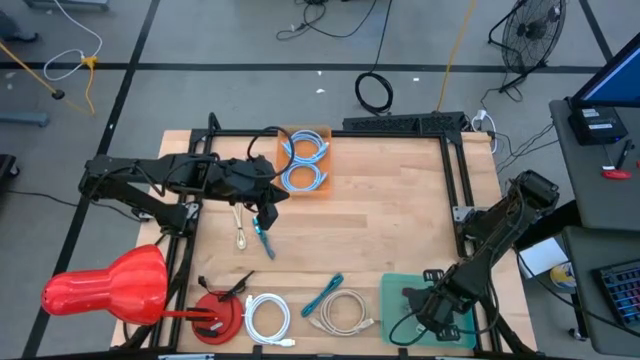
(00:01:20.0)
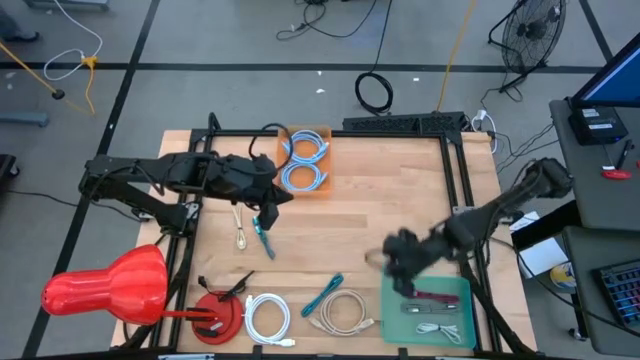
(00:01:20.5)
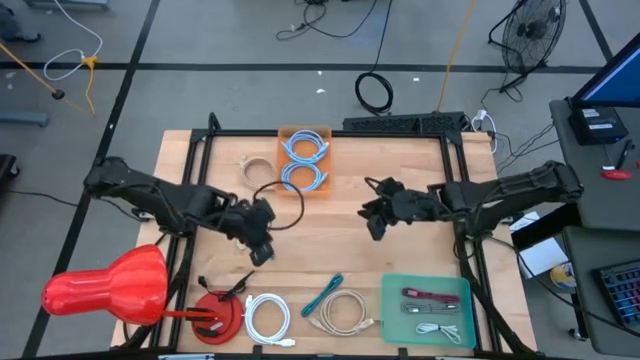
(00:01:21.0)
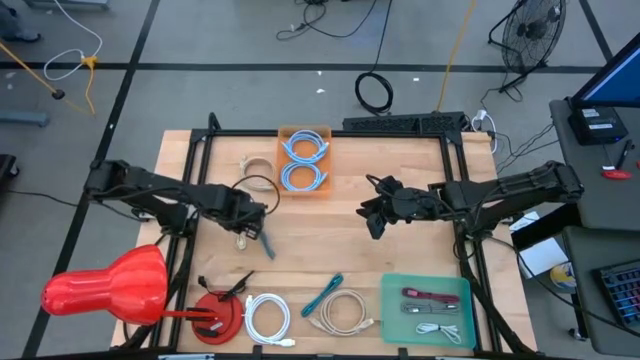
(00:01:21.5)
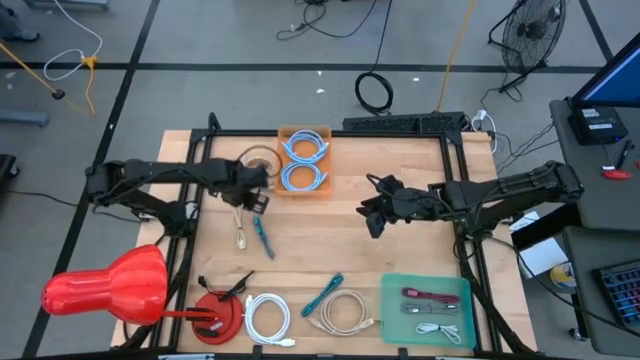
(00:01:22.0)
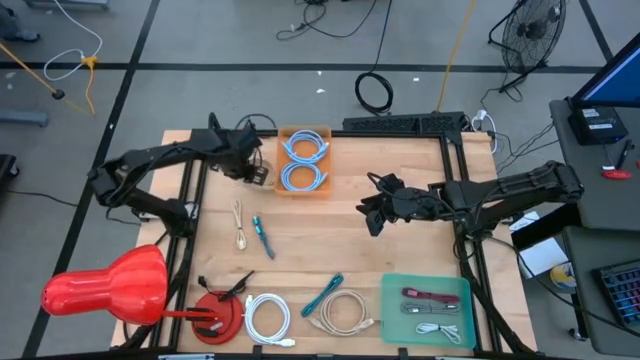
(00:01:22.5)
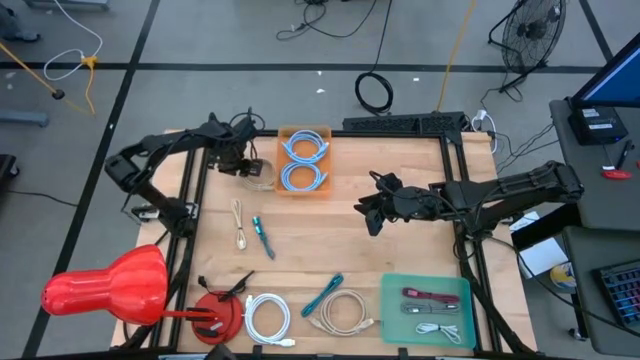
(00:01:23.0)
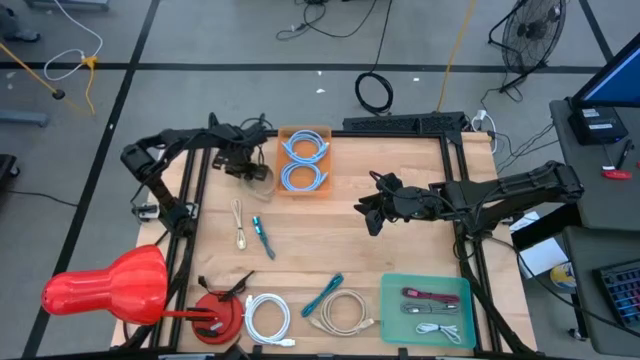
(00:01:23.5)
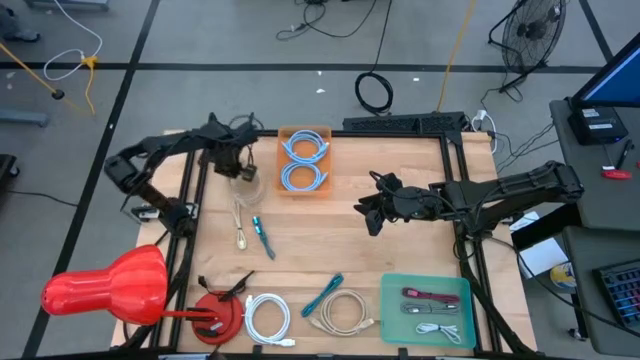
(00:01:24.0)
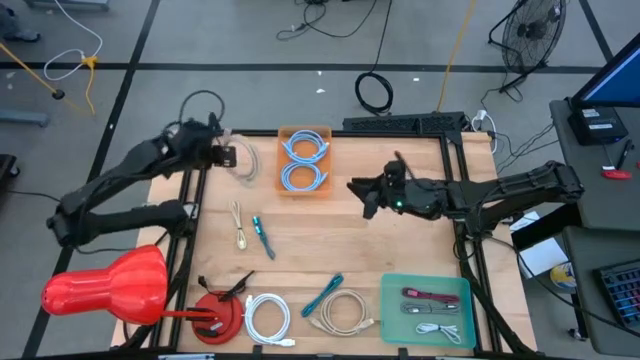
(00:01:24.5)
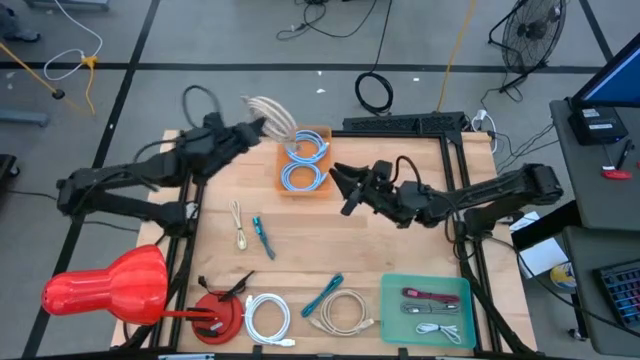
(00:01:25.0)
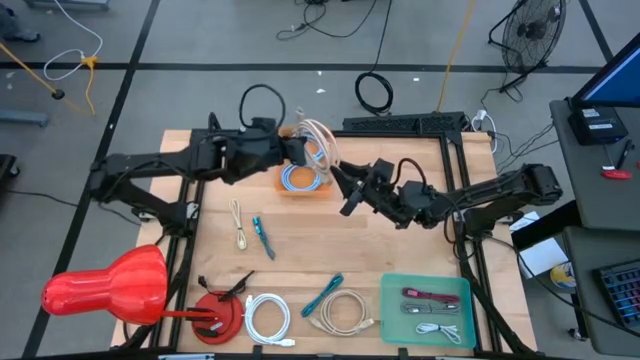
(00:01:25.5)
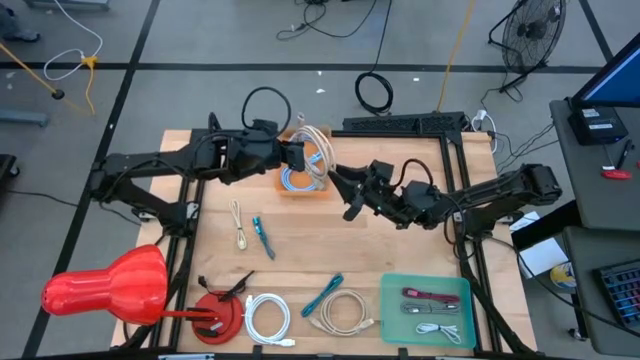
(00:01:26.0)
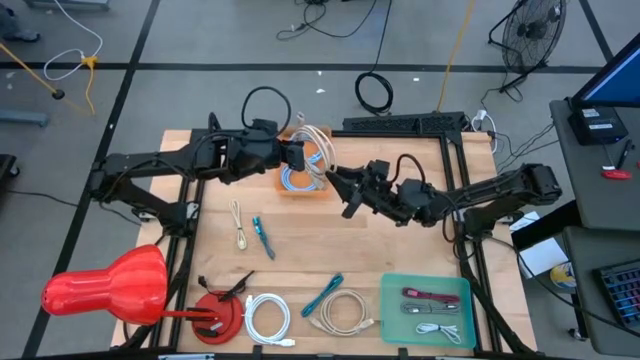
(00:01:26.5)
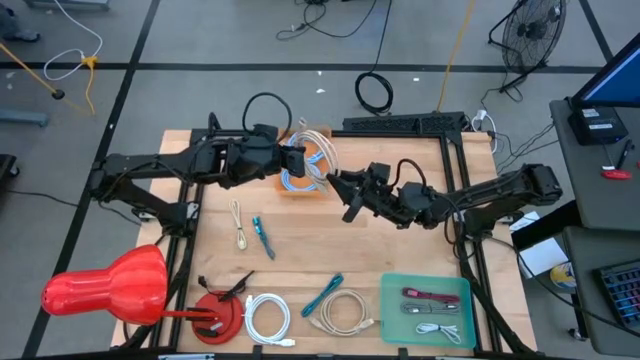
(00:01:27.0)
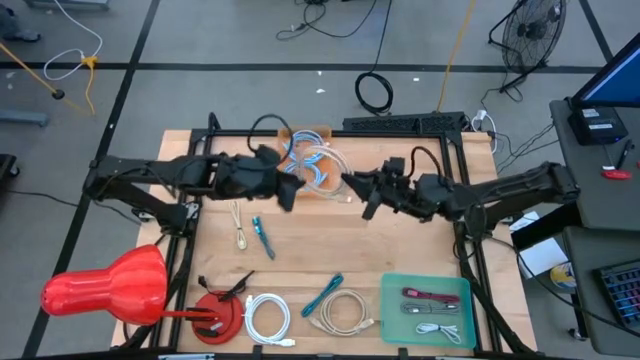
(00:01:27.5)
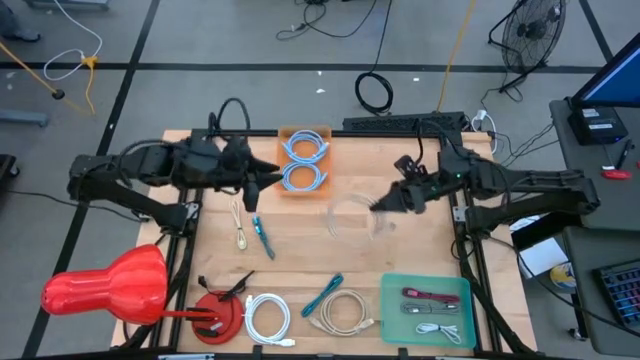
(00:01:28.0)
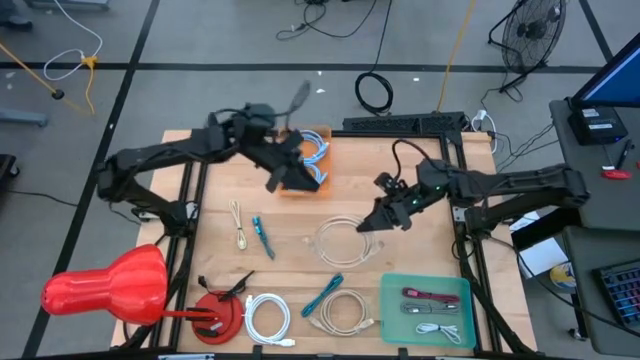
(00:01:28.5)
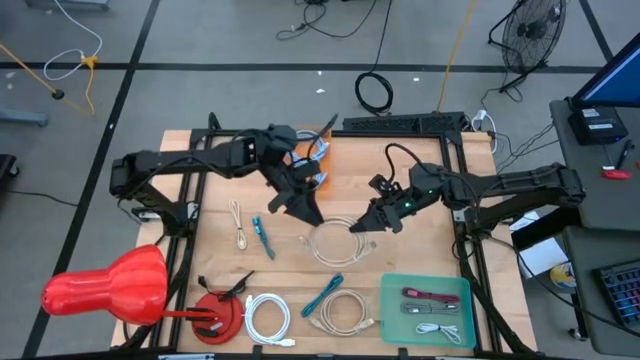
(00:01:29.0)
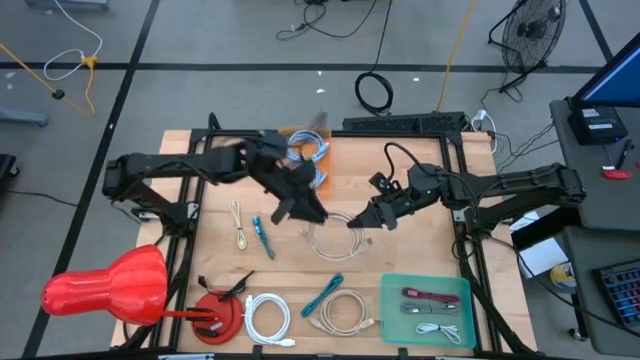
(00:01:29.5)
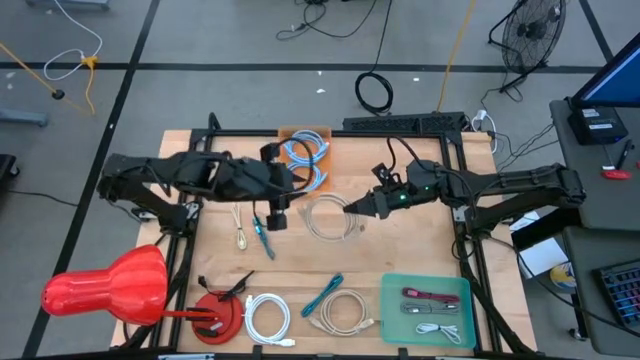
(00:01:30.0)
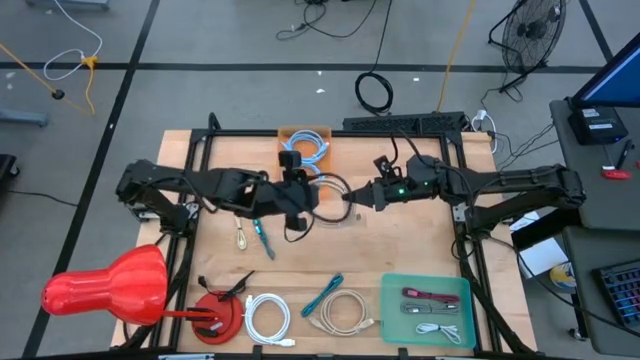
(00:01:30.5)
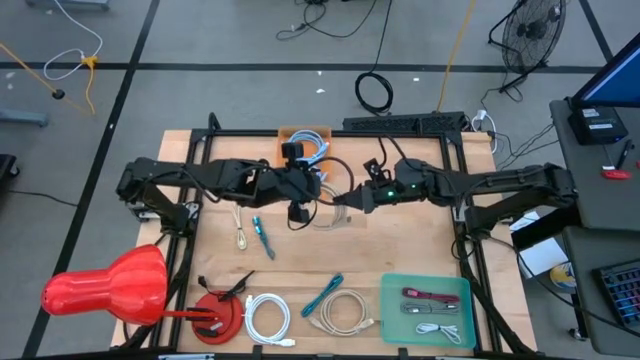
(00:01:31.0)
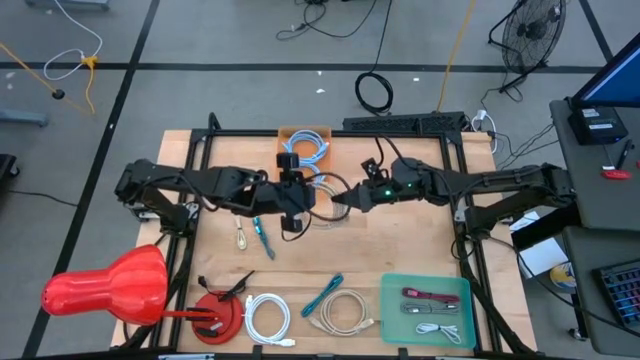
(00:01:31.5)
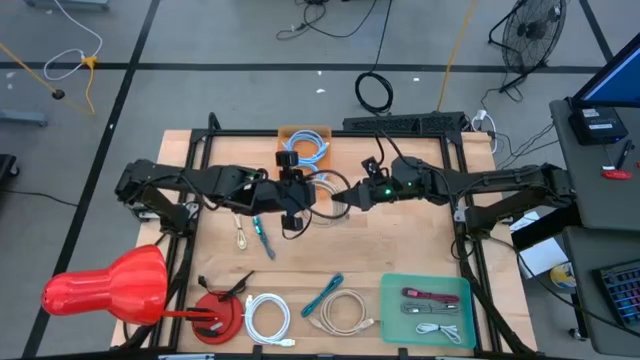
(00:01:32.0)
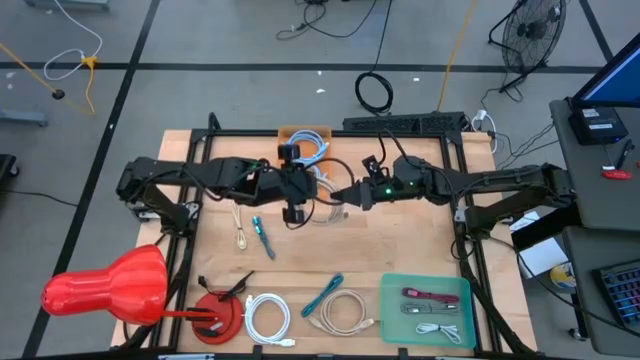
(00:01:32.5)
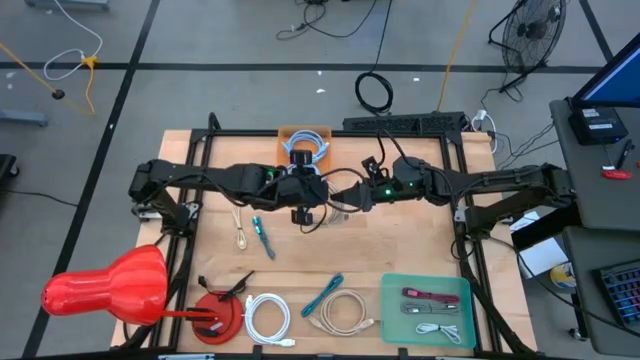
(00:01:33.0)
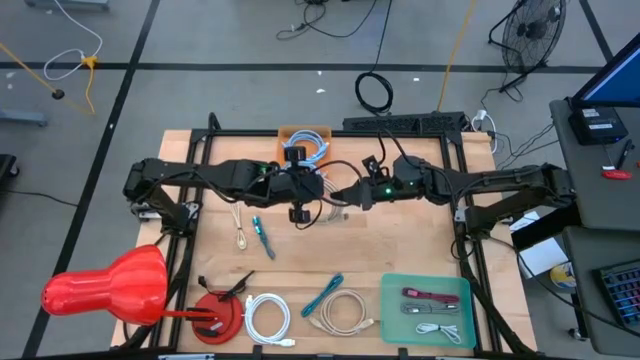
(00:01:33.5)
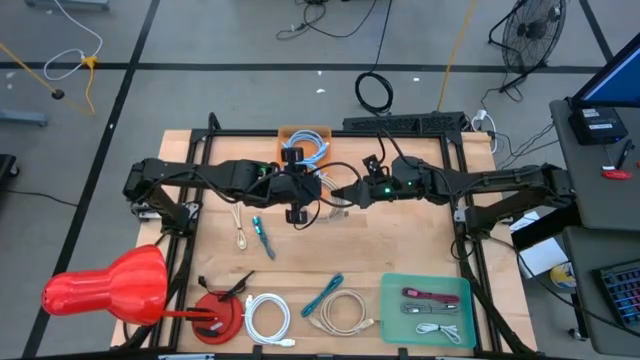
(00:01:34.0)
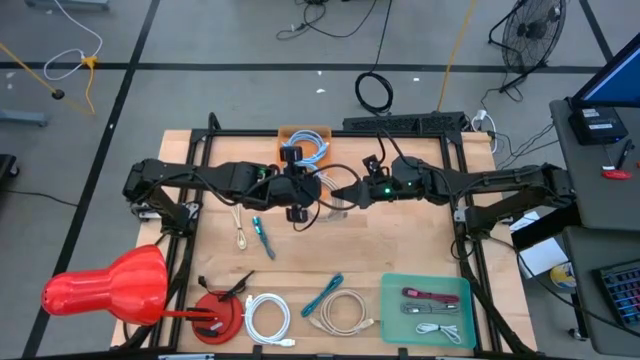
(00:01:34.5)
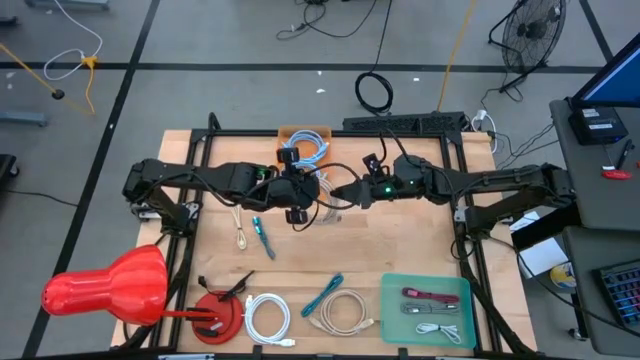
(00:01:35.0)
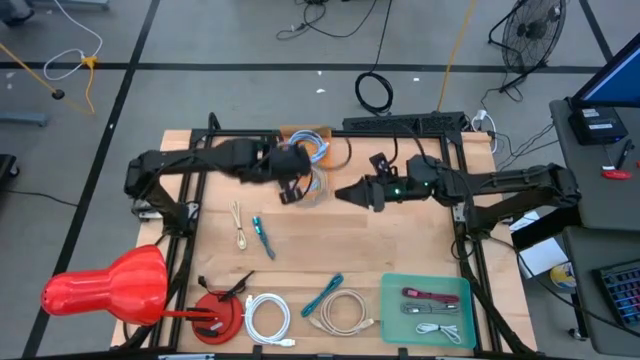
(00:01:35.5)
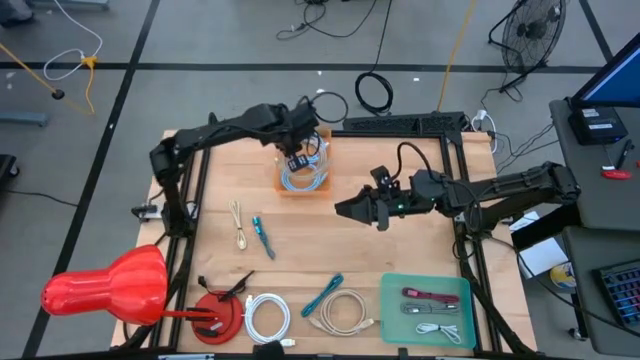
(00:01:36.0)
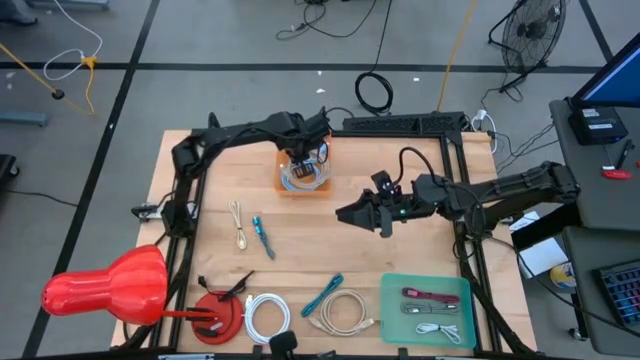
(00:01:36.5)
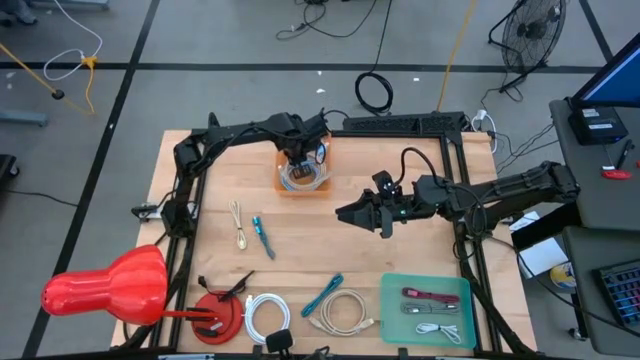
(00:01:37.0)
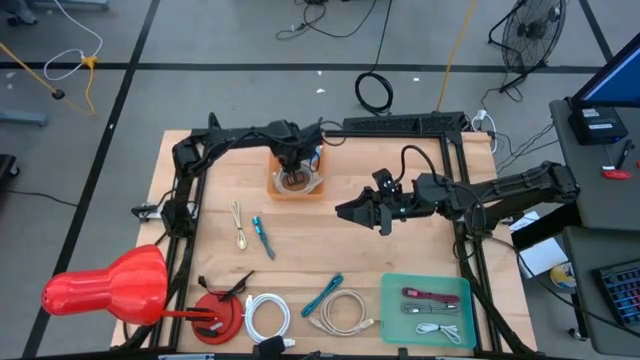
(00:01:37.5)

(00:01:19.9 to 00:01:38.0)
Task: Pick & Place USB Port
Put the top brown usb cable into the orange bin
